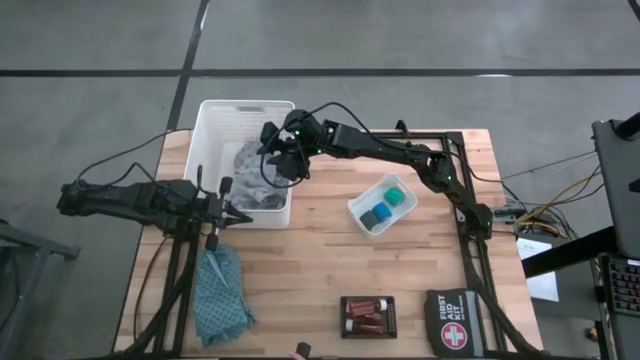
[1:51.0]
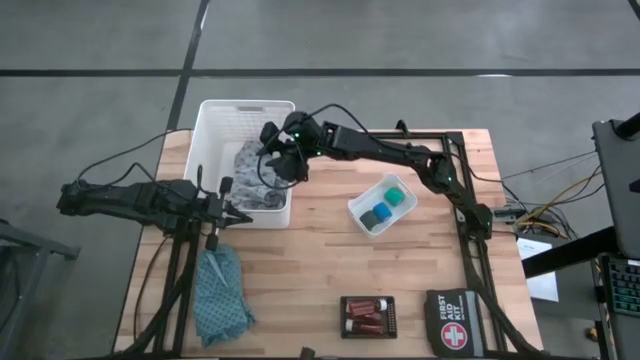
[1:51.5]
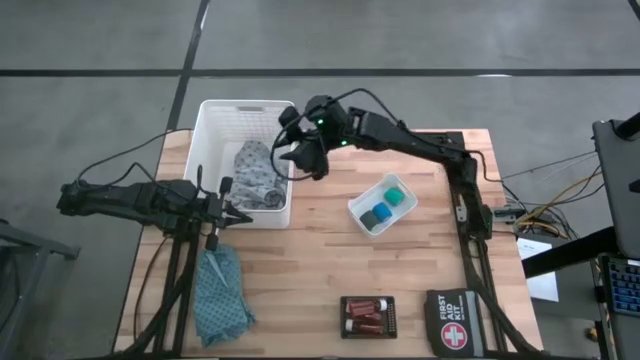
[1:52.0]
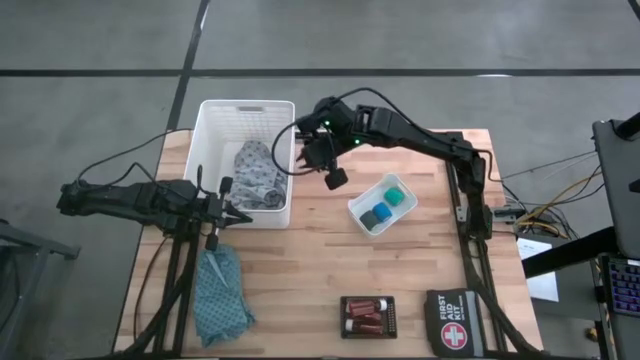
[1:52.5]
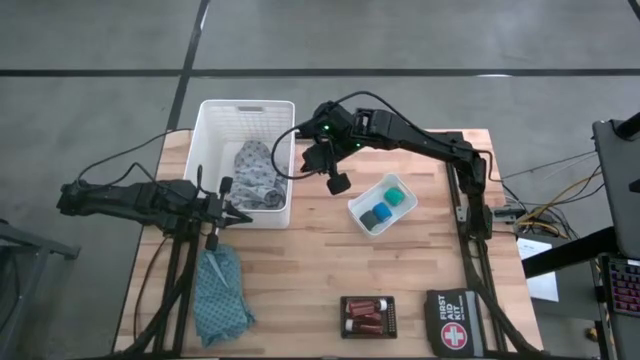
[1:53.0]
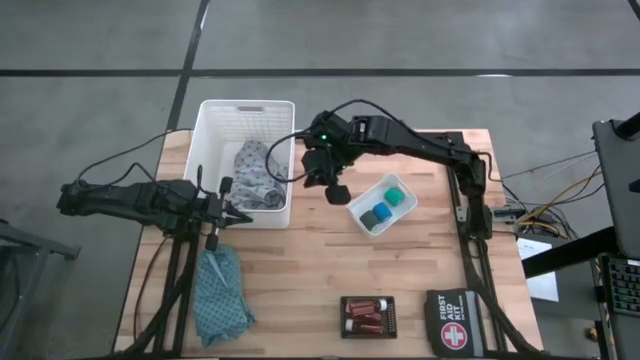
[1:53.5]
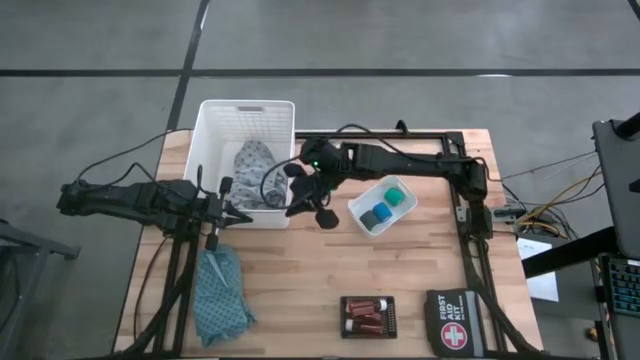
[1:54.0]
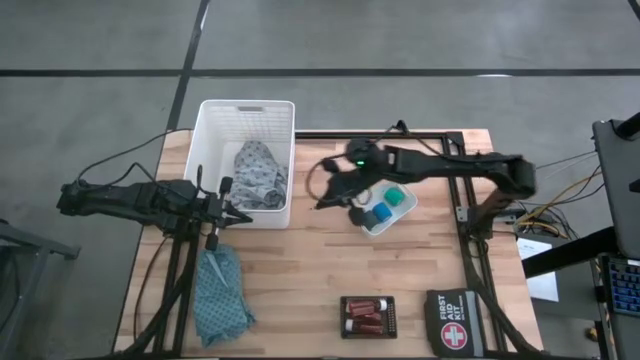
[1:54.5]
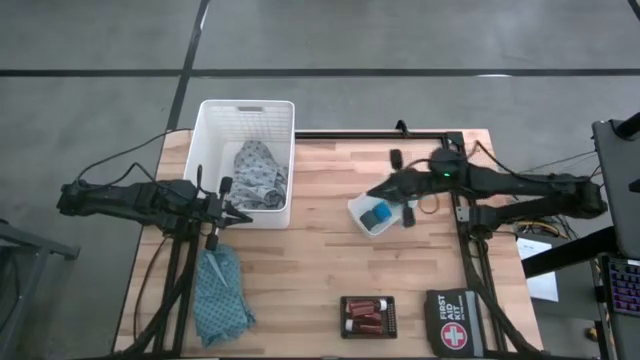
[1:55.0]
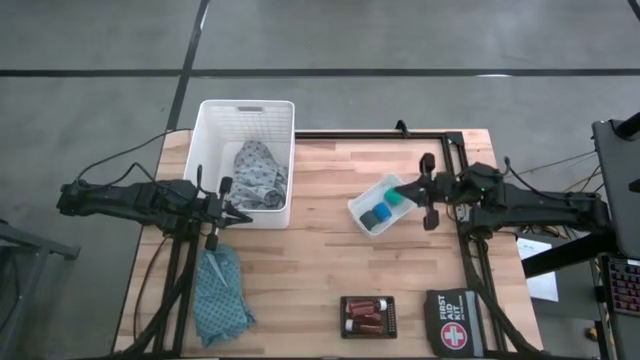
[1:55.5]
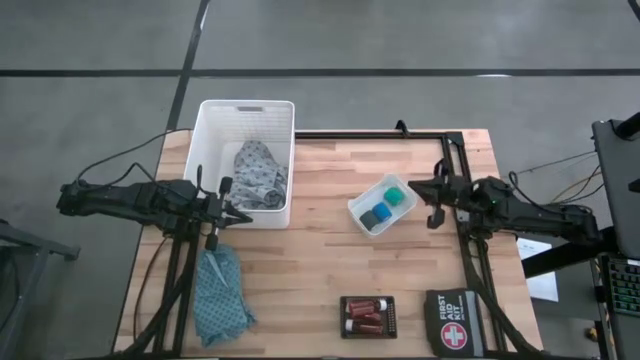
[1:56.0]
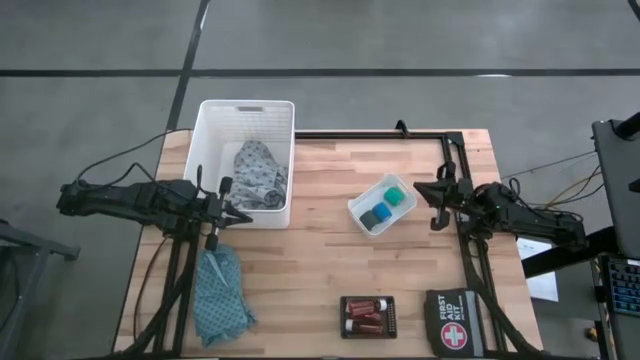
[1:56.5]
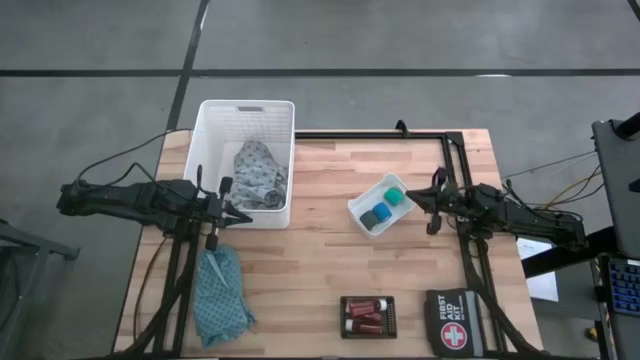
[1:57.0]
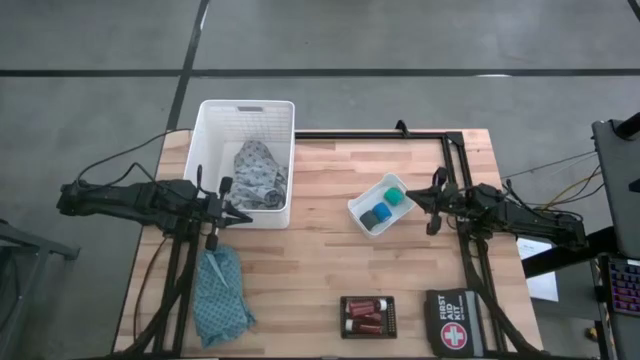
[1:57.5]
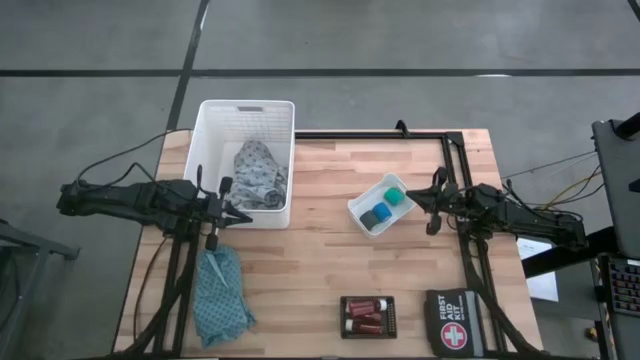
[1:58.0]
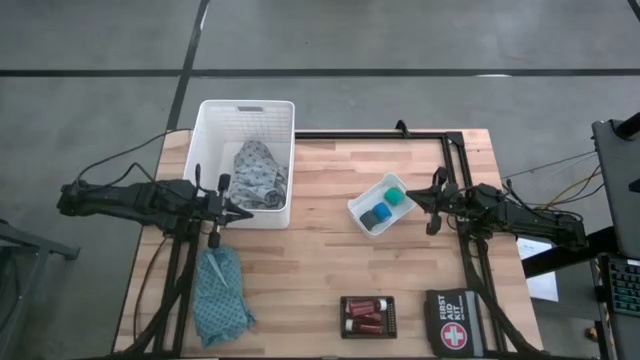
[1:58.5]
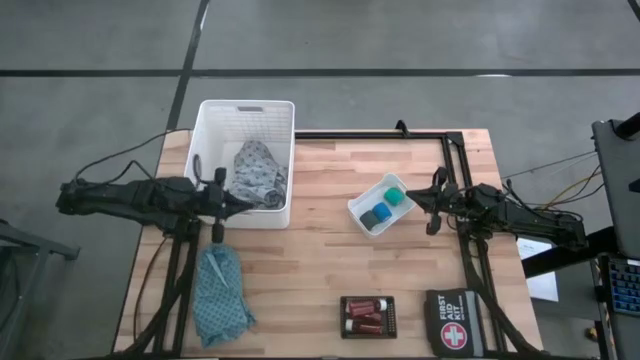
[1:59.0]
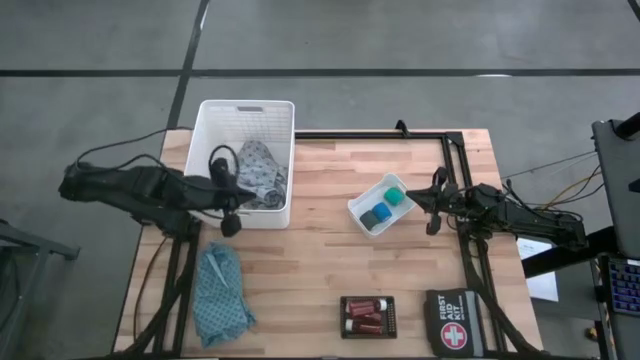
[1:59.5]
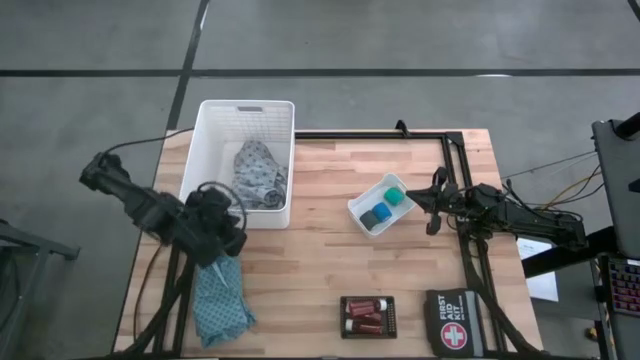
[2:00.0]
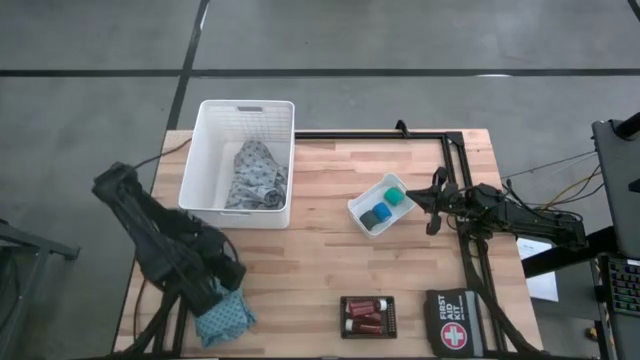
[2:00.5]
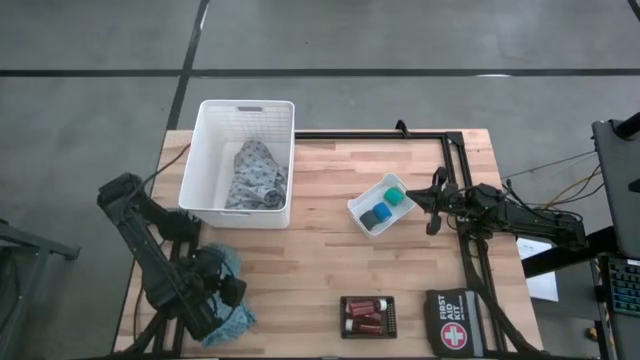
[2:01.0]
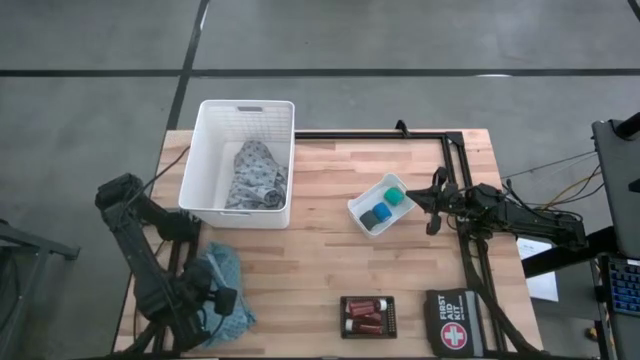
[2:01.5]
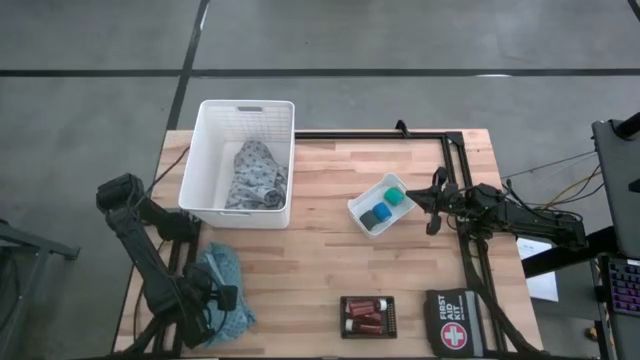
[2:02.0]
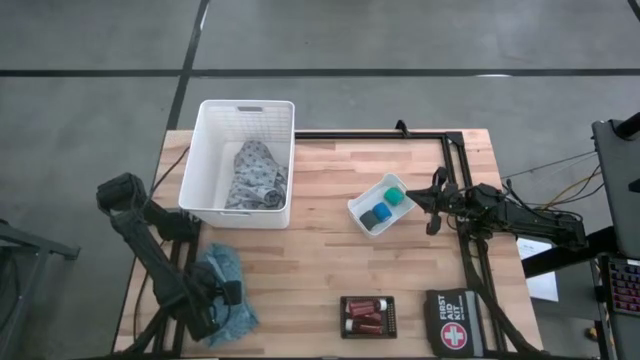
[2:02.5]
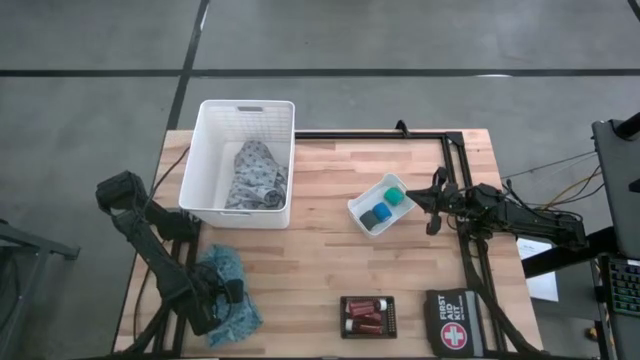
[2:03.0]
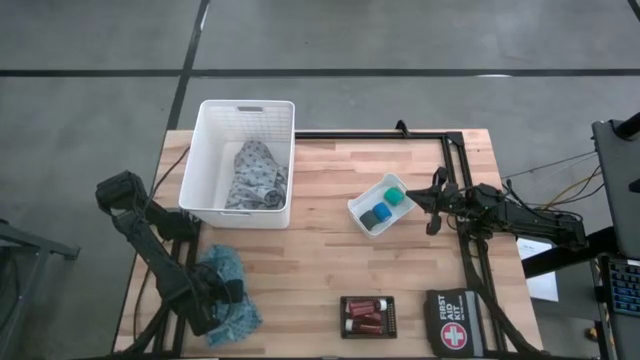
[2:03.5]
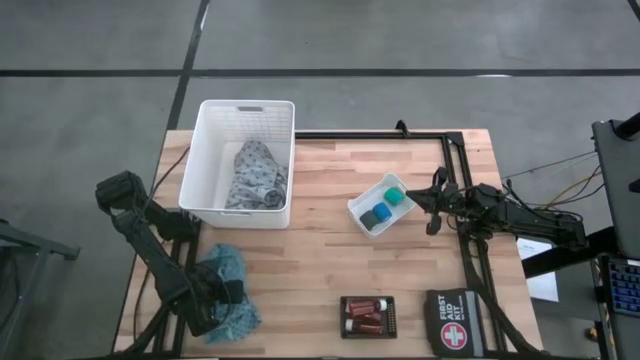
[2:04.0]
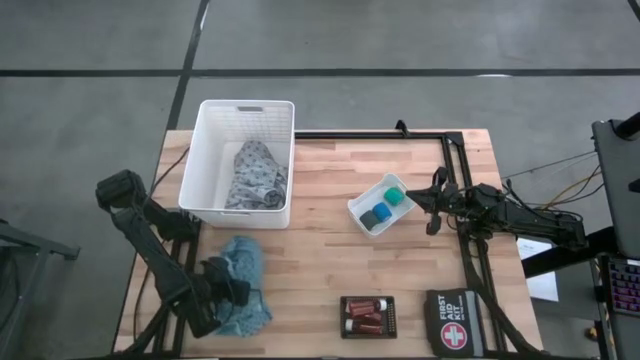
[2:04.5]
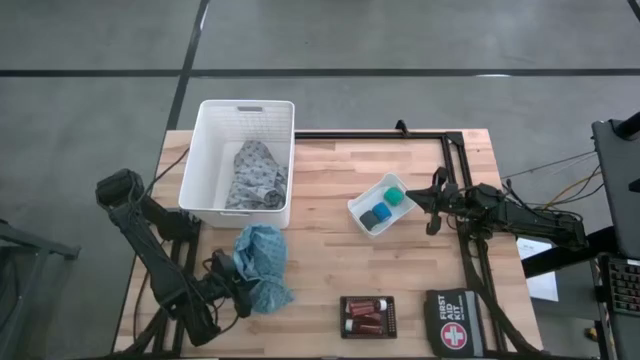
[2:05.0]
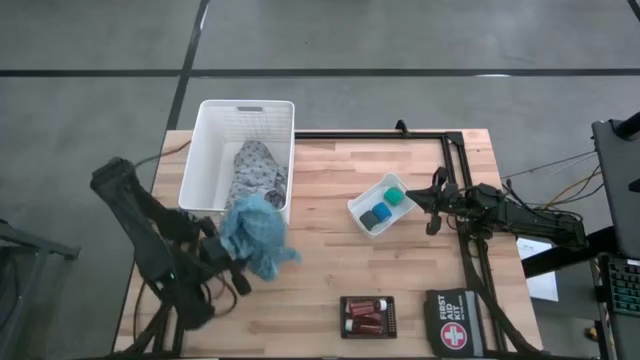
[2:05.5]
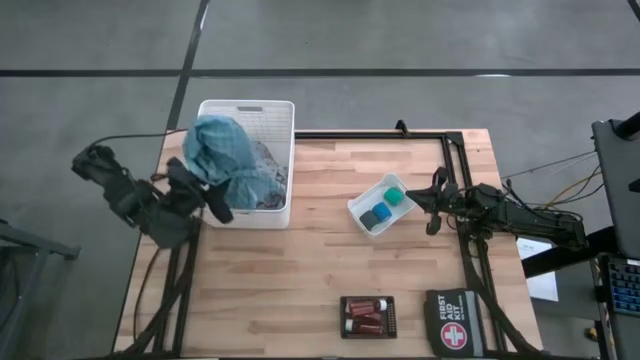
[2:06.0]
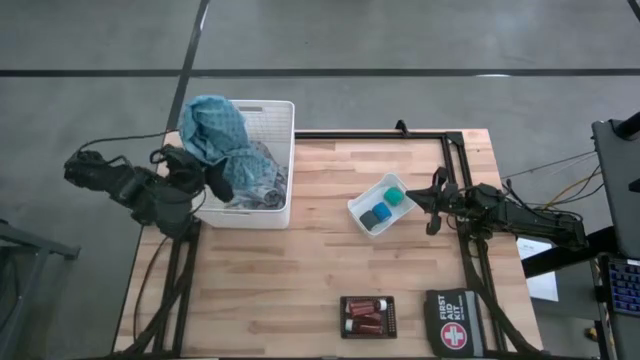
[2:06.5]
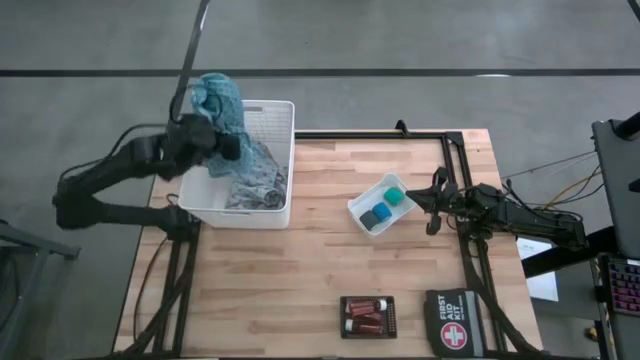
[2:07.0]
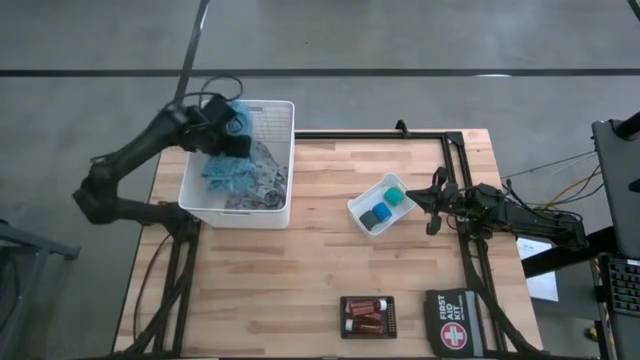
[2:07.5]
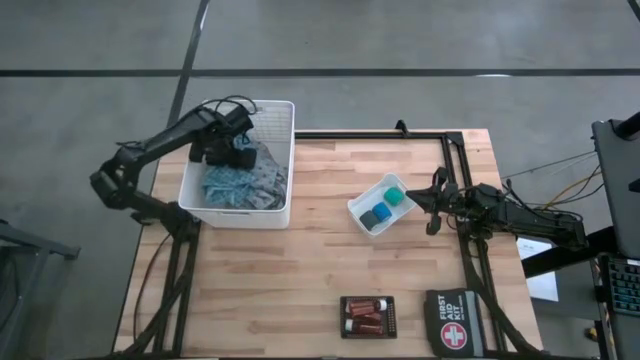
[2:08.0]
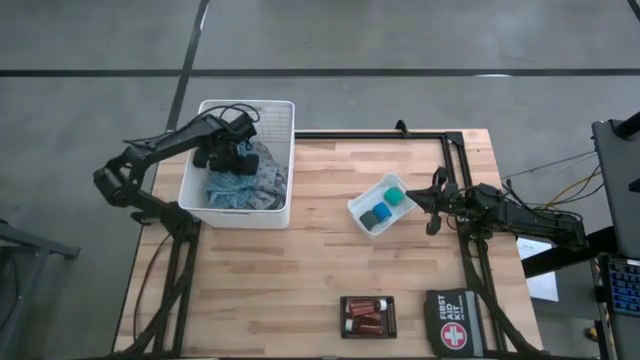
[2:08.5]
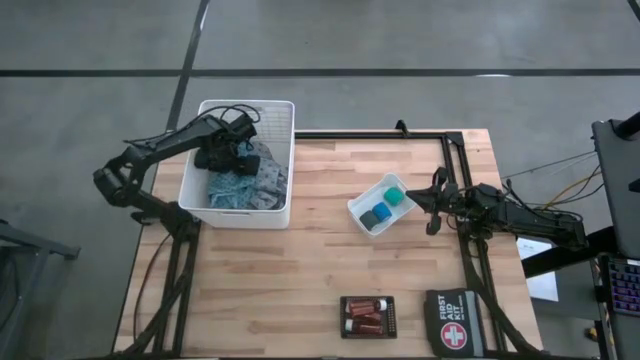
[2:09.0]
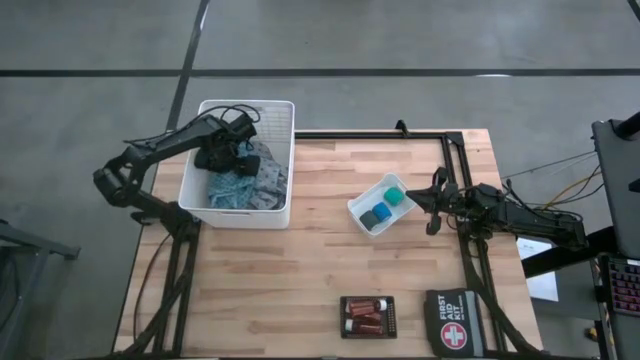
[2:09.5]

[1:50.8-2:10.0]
Task: Pick & place medical supplies in basket/bin
Put the blue patient gown into the large white bin
